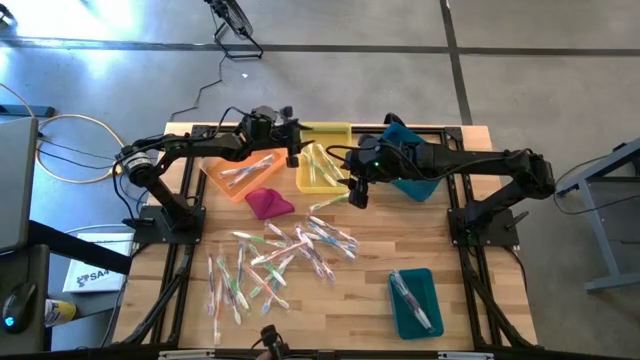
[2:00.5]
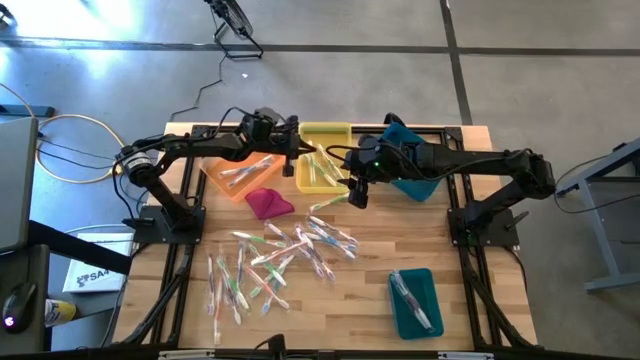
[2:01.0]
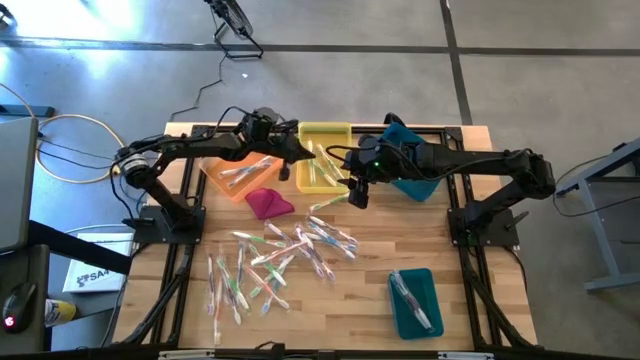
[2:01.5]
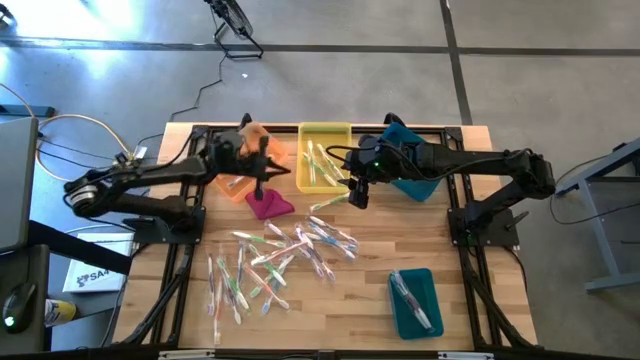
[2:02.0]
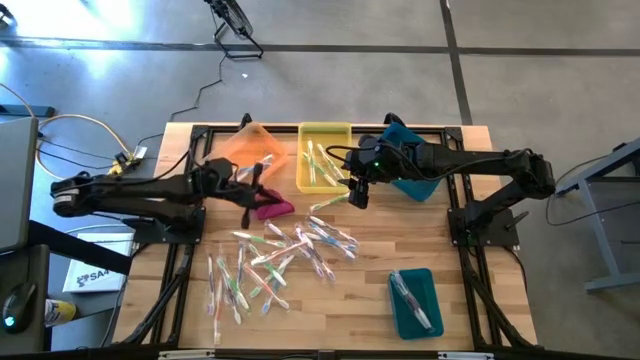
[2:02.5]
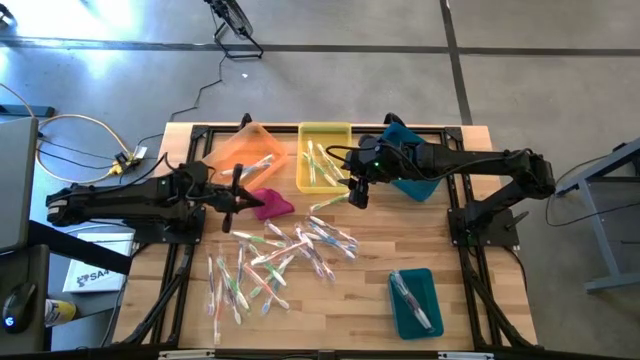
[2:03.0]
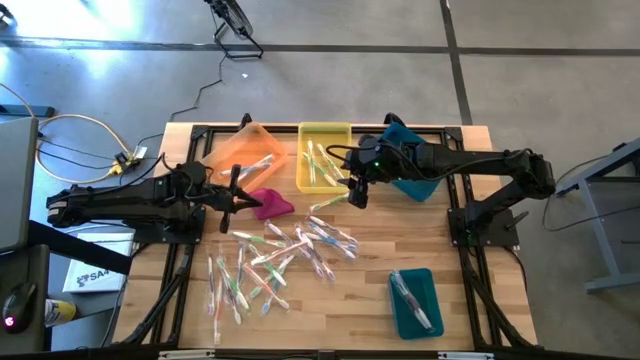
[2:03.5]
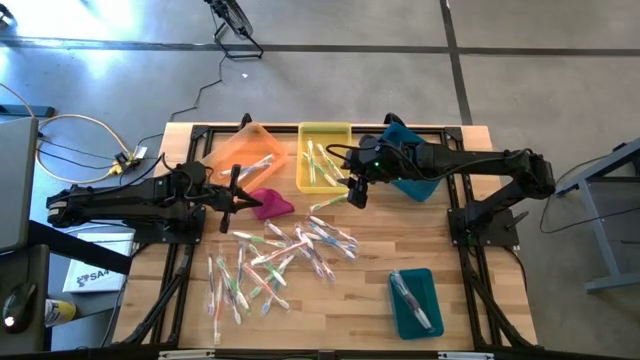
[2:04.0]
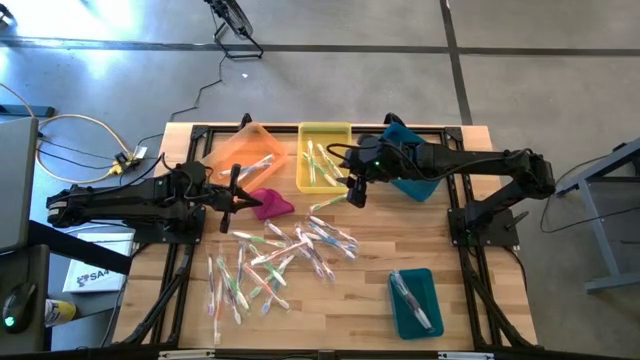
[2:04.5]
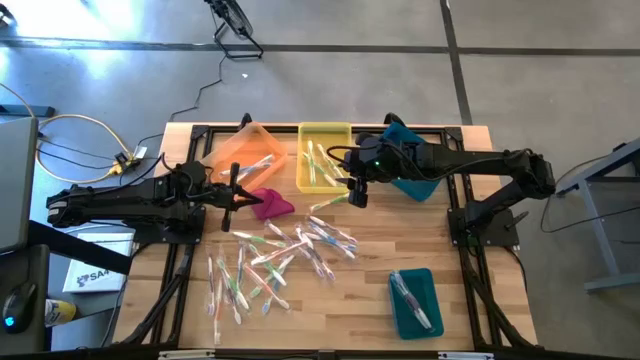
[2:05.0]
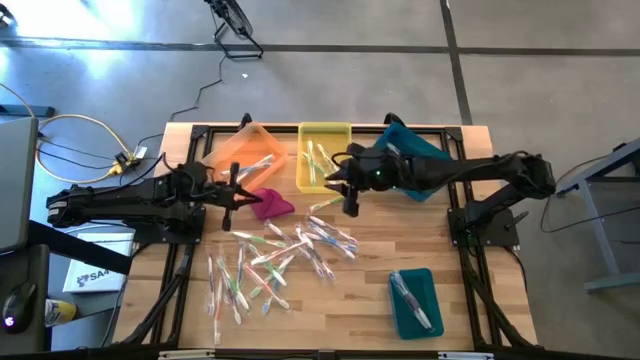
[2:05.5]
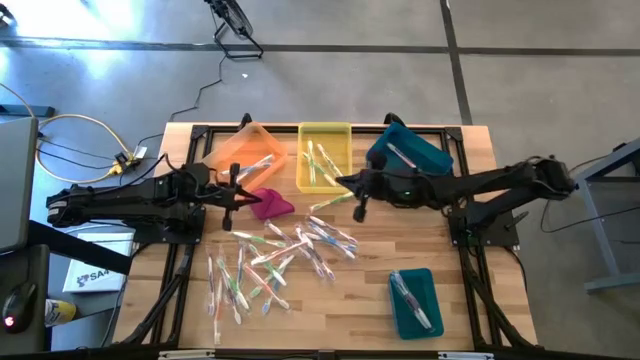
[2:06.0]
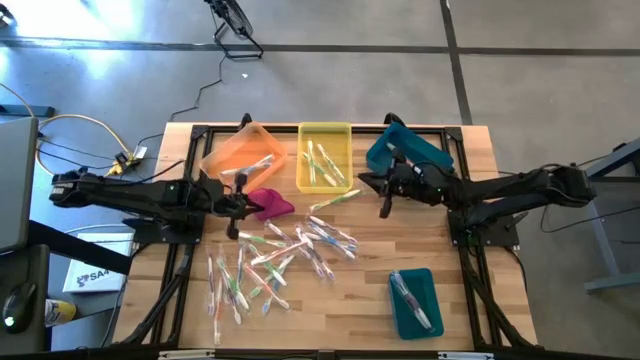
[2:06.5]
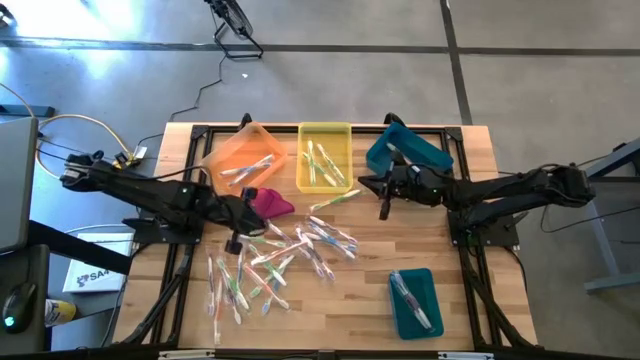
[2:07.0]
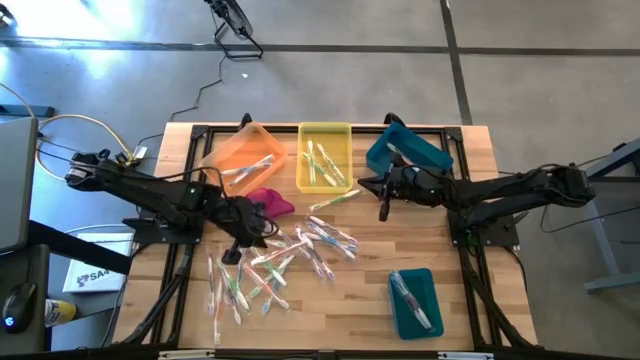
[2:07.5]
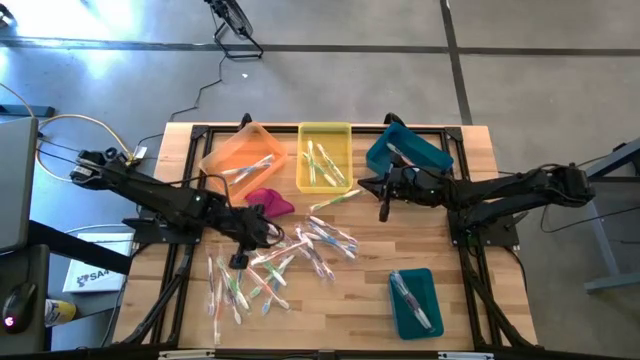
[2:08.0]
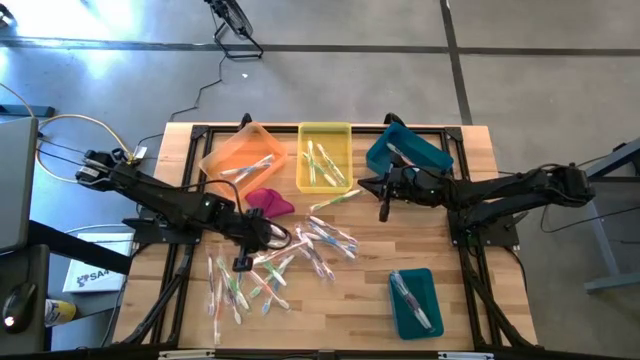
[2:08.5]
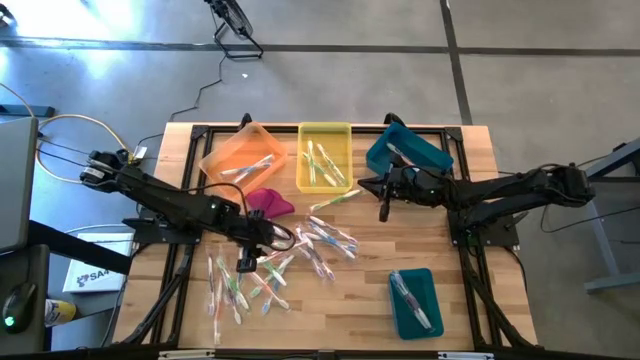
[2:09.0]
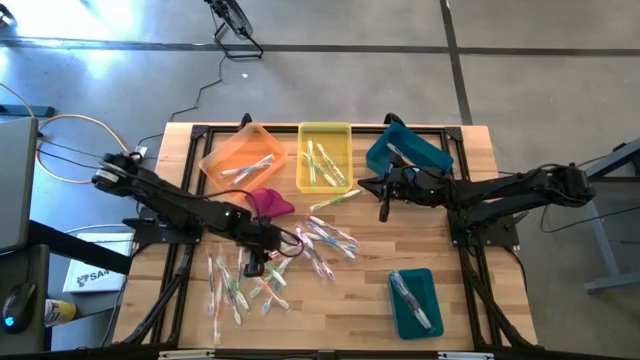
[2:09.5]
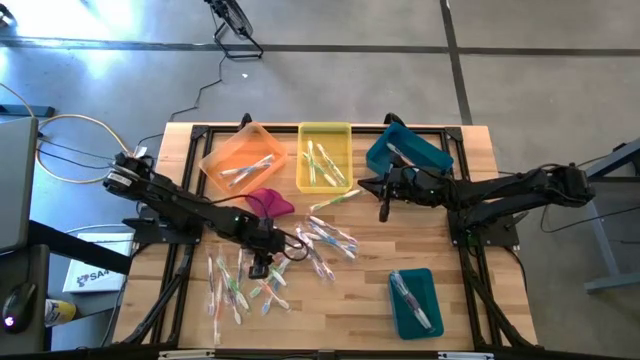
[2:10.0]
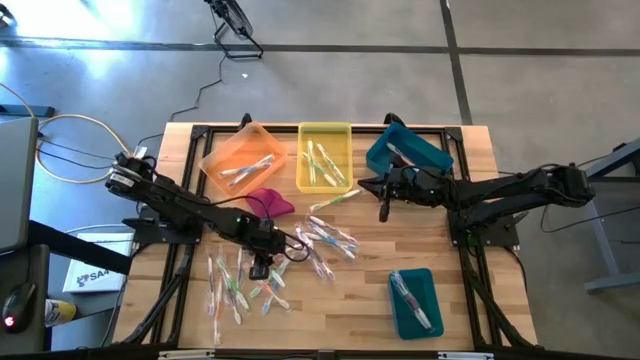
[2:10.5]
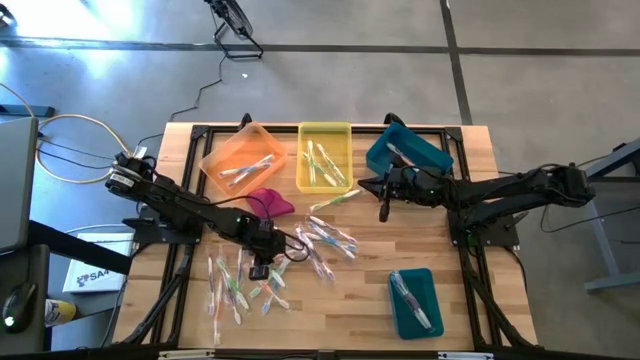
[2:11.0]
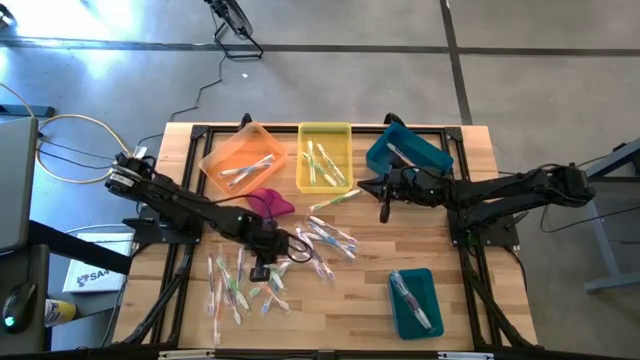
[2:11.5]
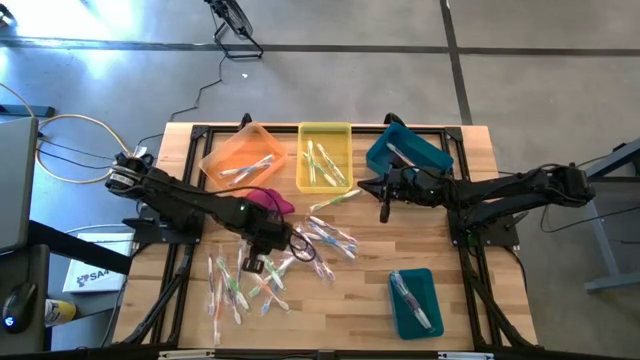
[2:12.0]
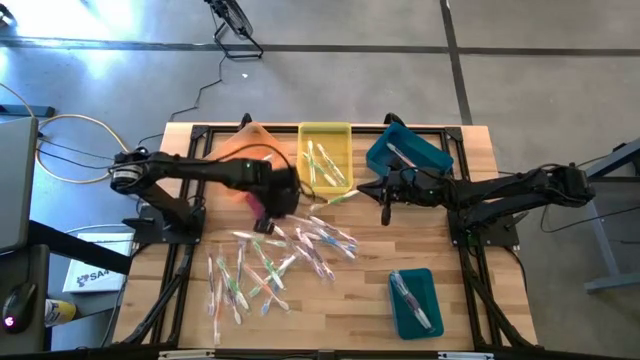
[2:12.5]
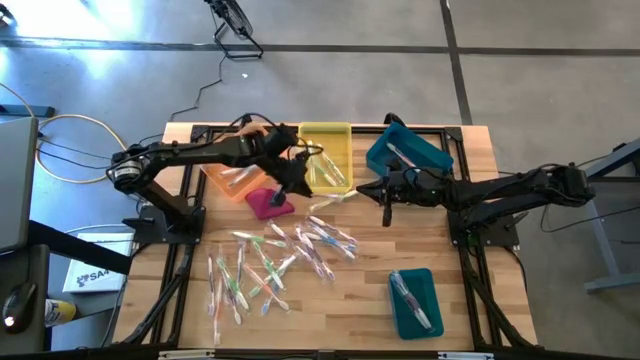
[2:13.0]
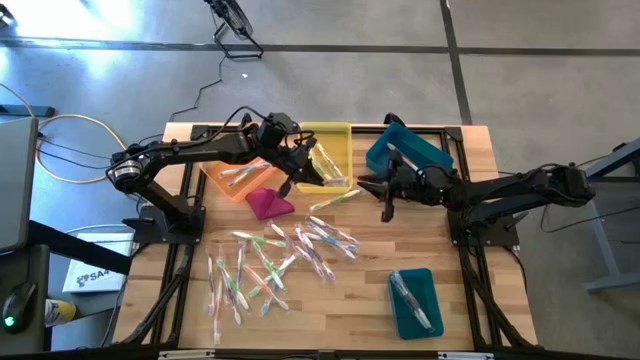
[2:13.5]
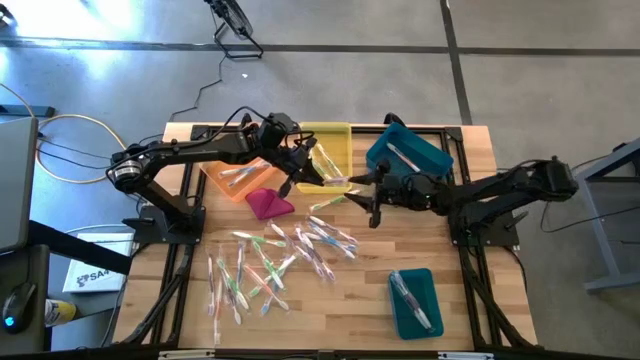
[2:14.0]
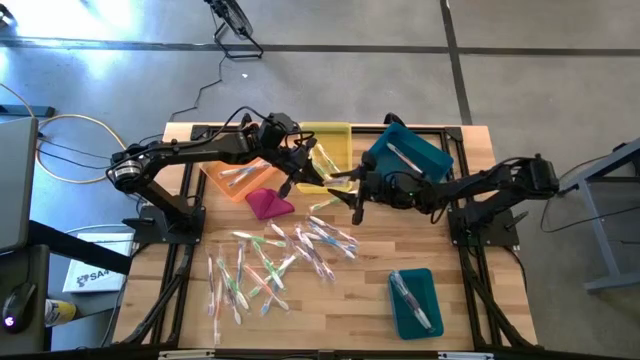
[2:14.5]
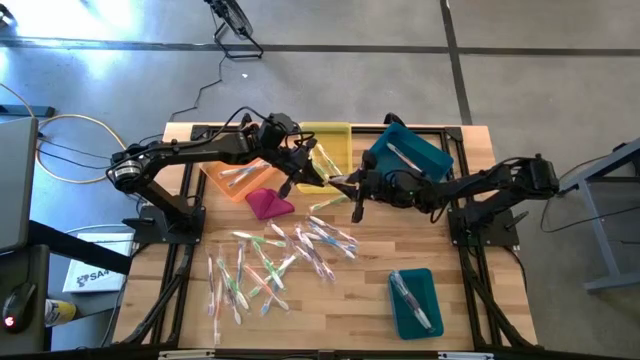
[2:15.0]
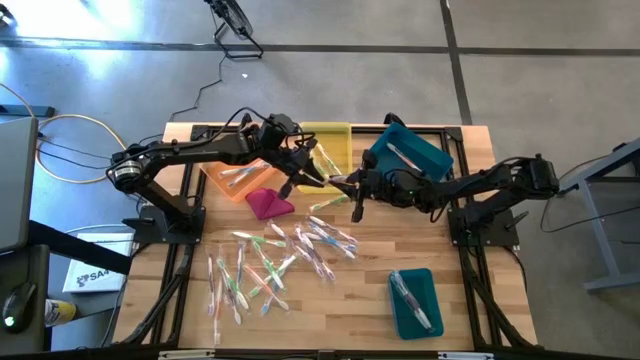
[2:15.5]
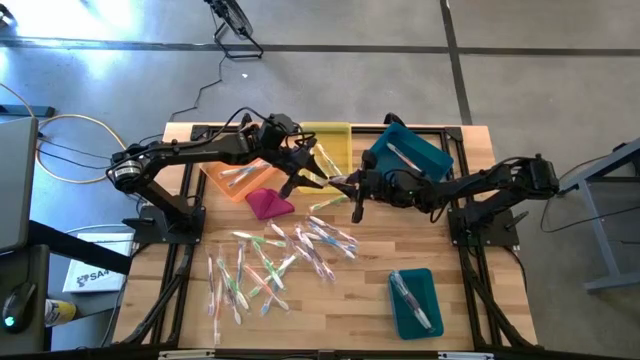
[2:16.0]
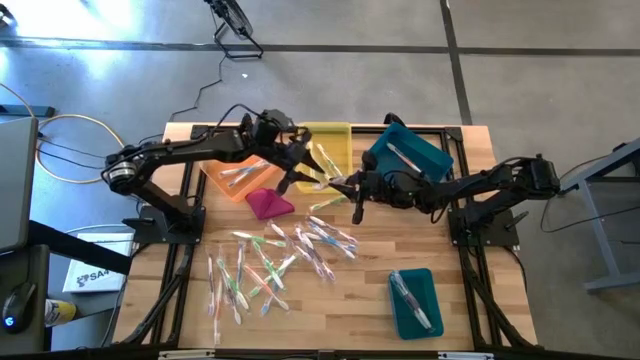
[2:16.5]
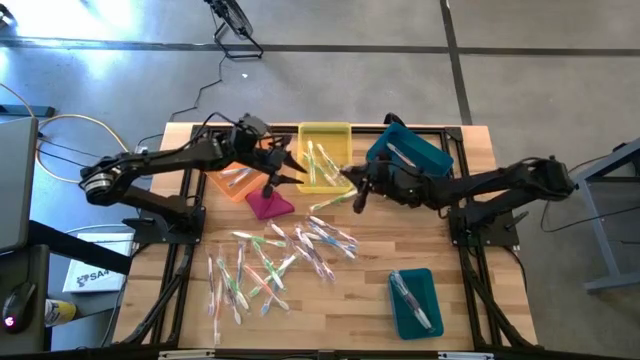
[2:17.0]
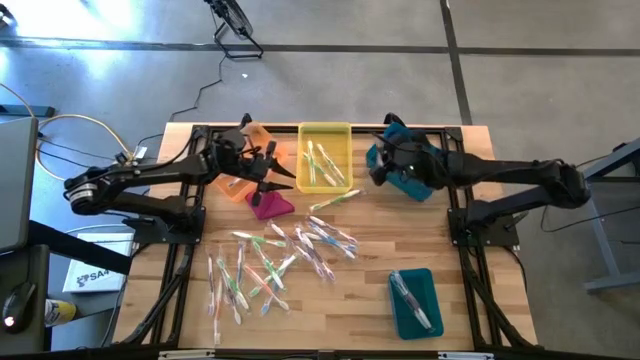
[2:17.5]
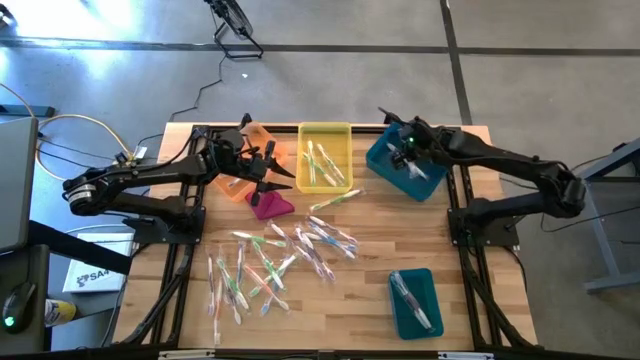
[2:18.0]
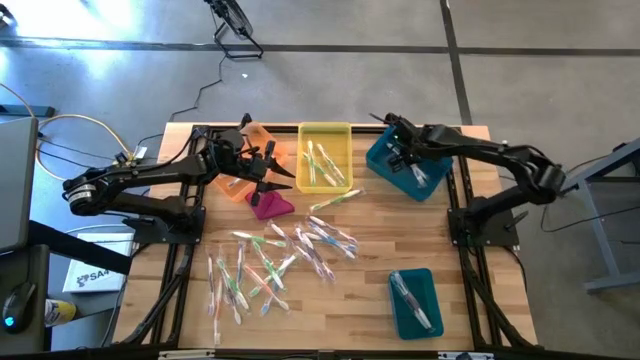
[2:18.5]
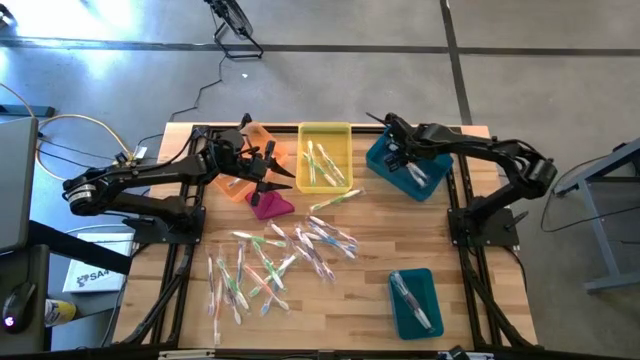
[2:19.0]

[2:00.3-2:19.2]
Task: Pick & Place Toothbrushes
Put the orange toothbrush into the top blue bin

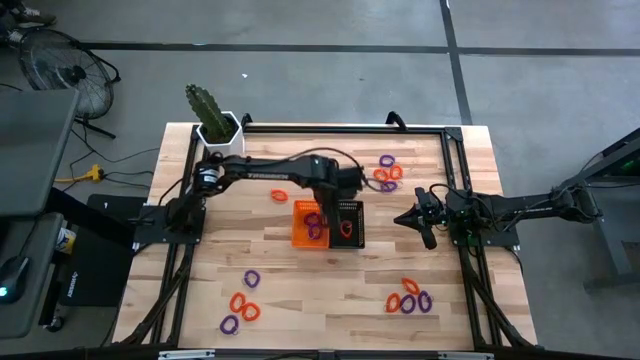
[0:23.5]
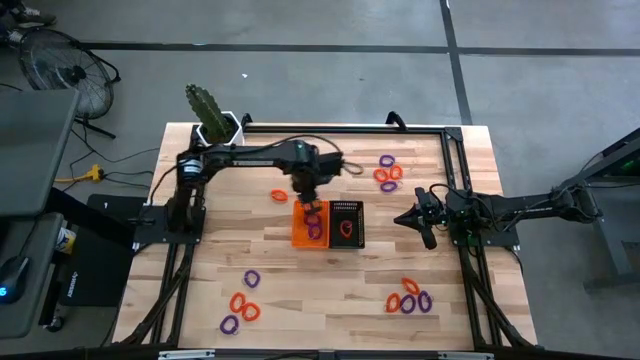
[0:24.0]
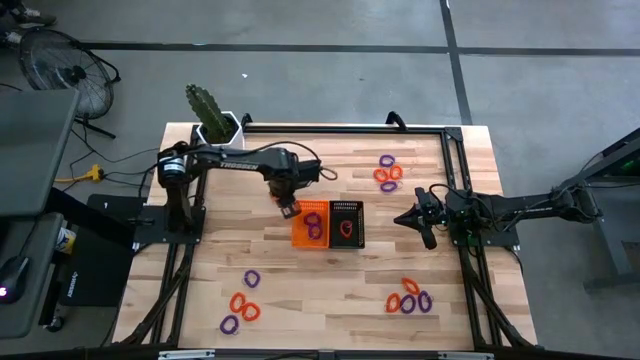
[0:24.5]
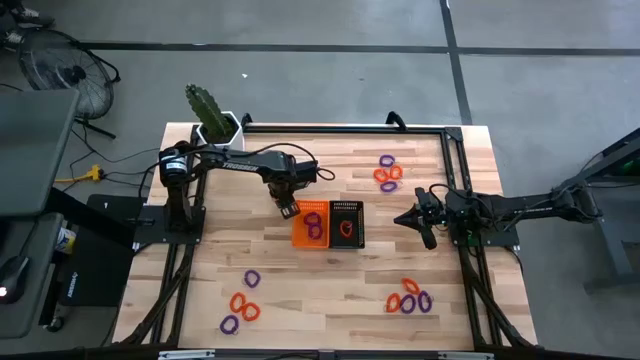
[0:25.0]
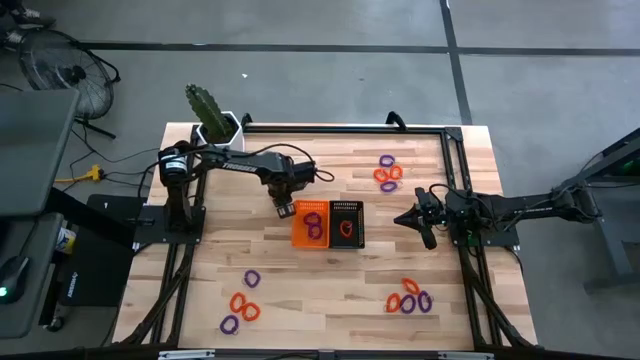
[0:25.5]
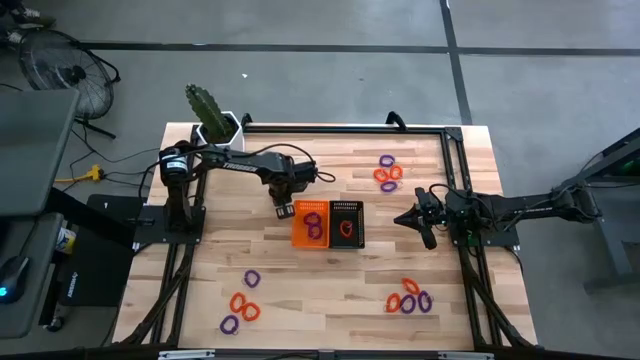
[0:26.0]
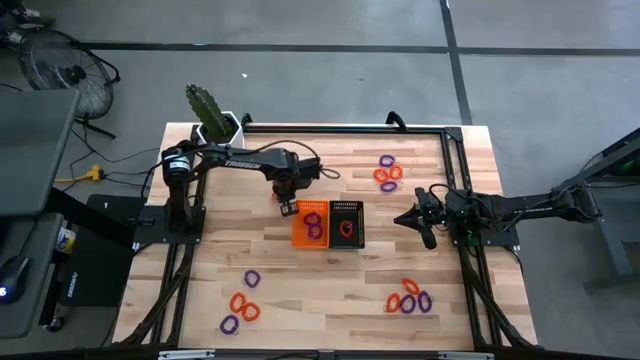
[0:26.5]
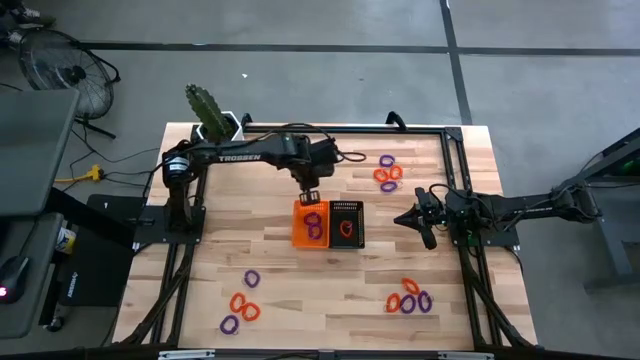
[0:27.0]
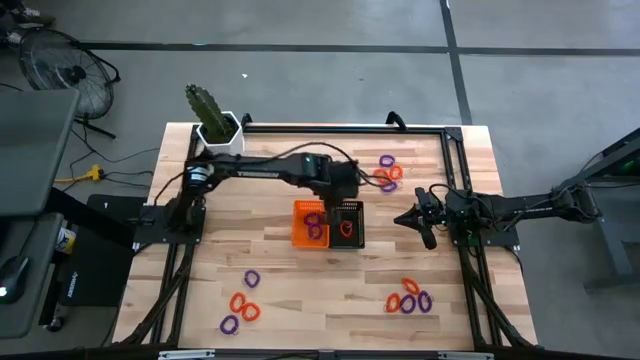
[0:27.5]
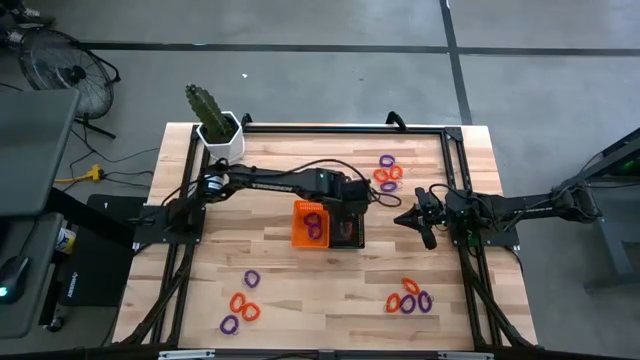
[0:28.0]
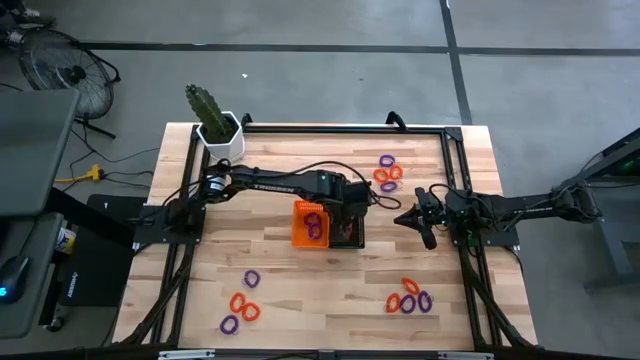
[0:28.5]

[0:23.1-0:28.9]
Task: Sort spring keychains
Put the orange spring keychain into the black bin
